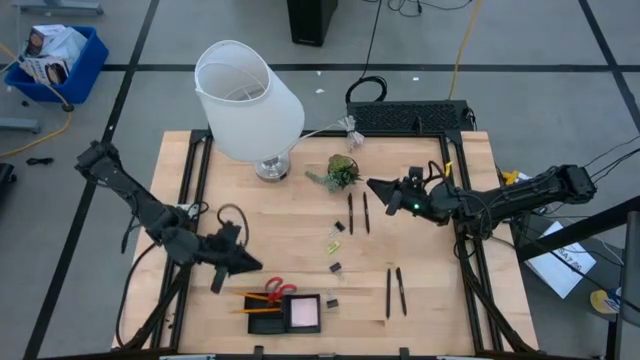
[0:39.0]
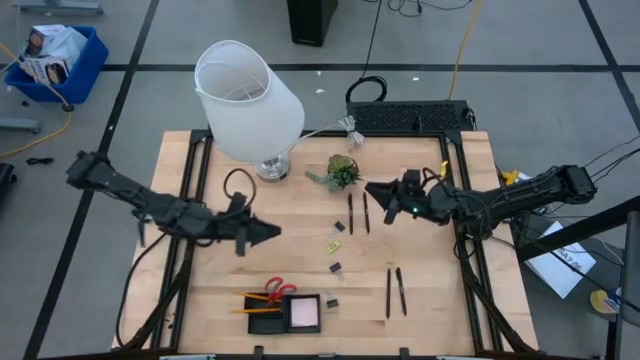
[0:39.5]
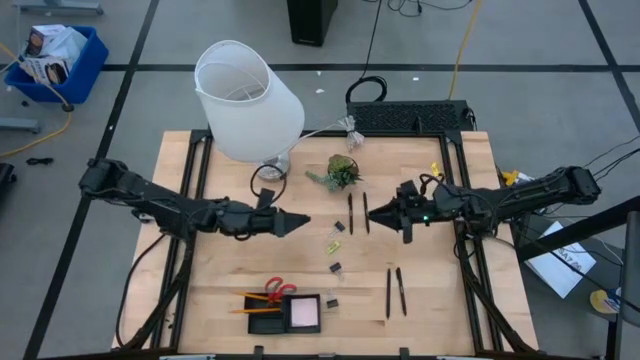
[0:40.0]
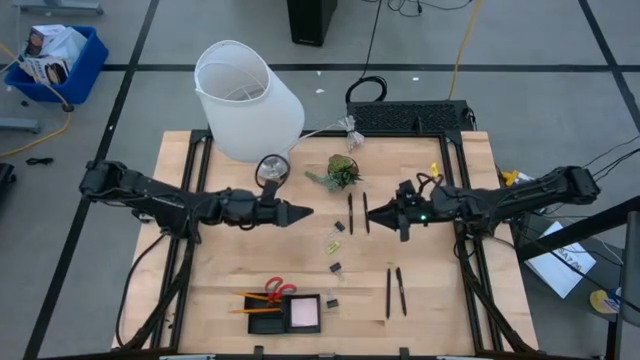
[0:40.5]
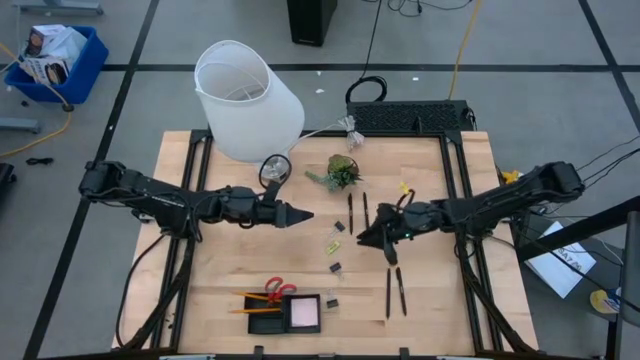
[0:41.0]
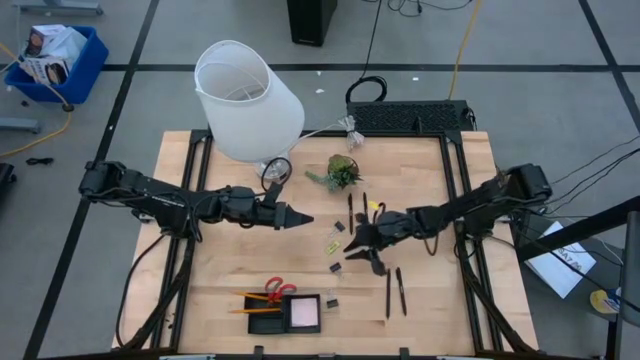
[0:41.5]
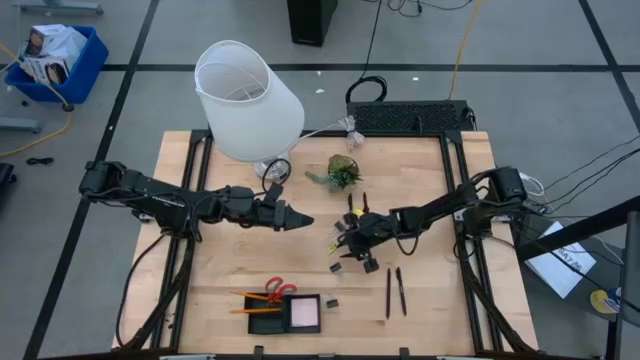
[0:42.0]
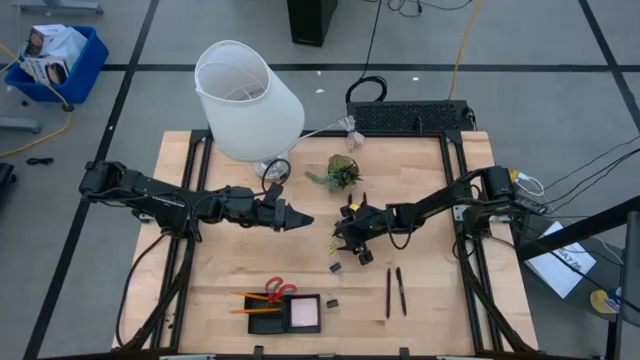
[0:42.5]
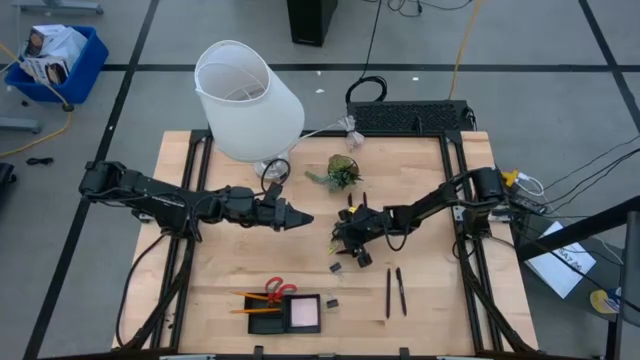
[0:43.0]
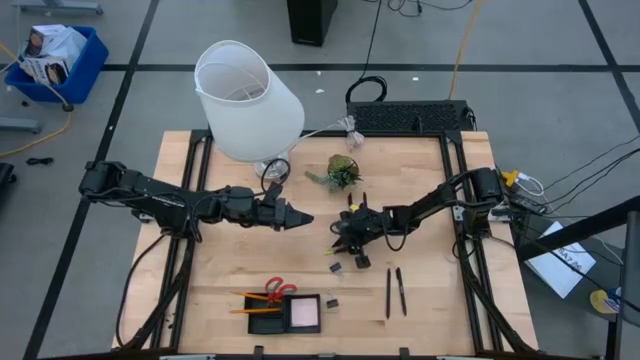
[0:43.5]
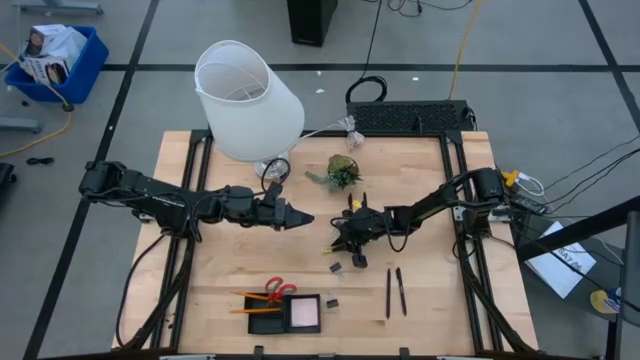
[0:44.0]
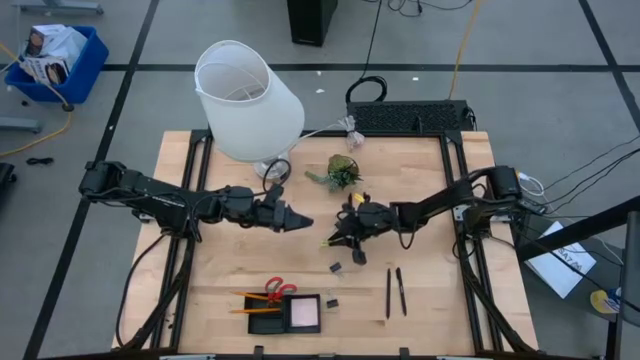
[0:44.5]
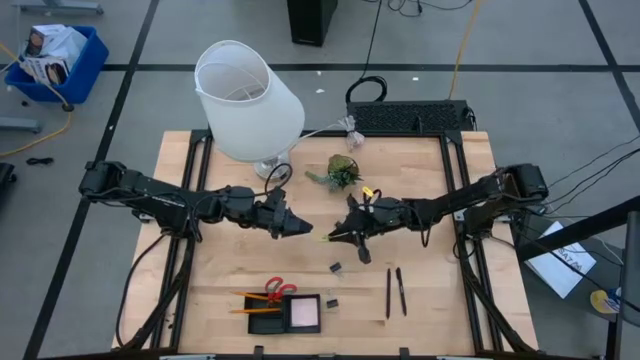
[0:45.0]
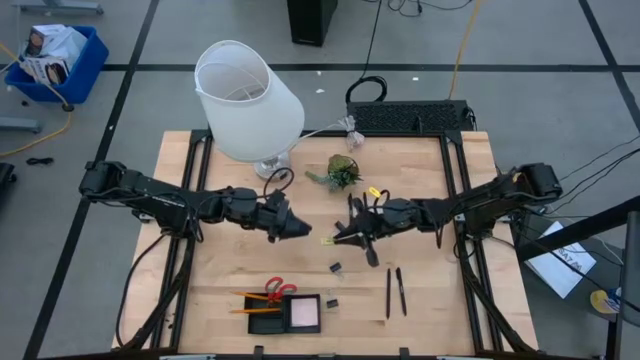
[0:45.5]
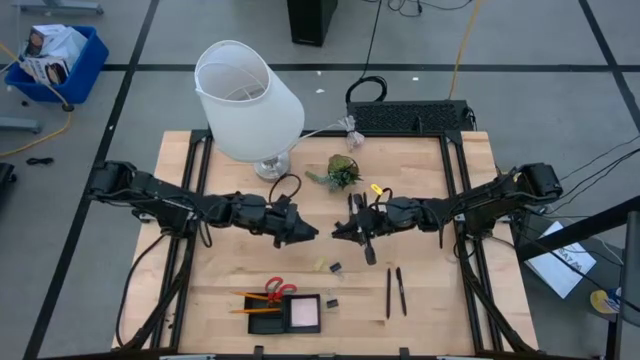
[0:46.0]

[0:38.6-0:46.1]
Task: Pick and place office supplies into organizer
Put the middle black binder clip into the mesh desk organizer

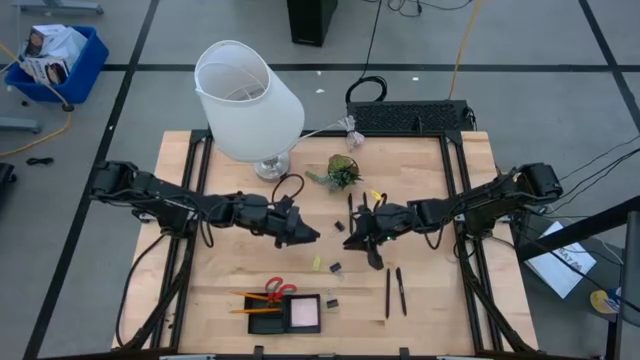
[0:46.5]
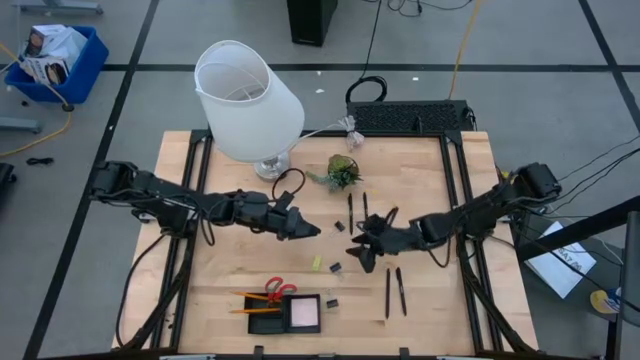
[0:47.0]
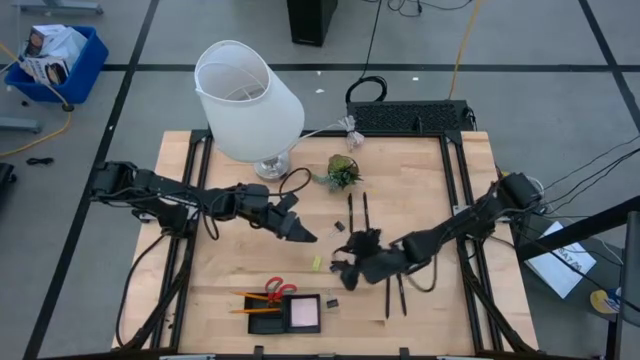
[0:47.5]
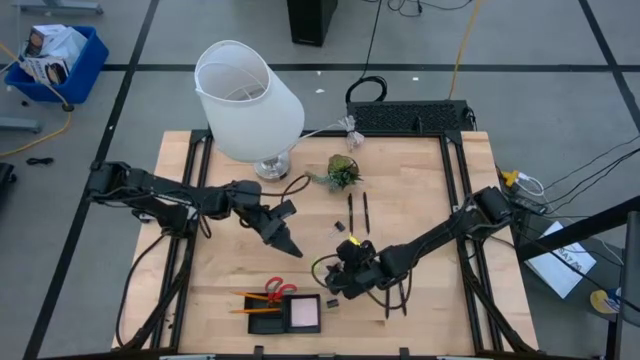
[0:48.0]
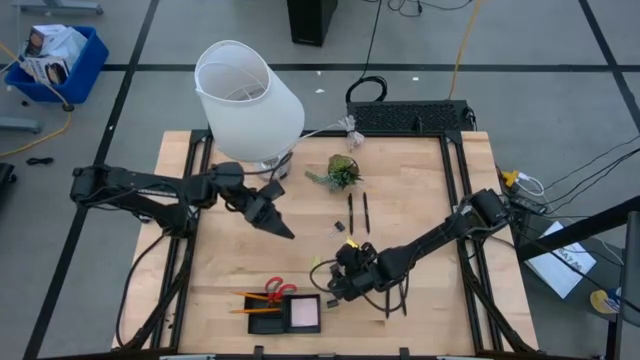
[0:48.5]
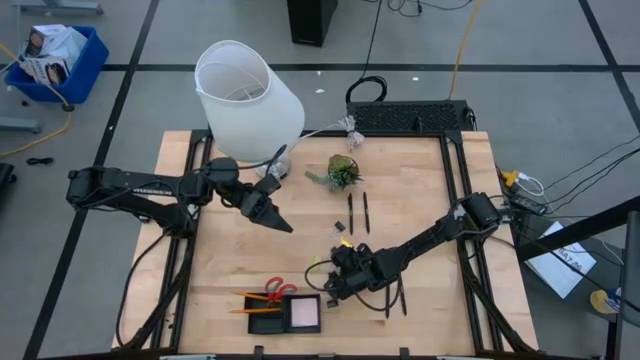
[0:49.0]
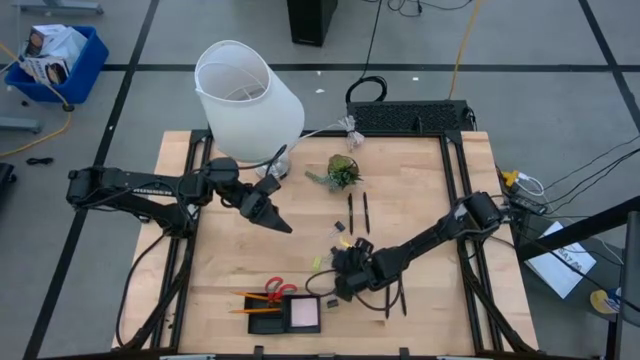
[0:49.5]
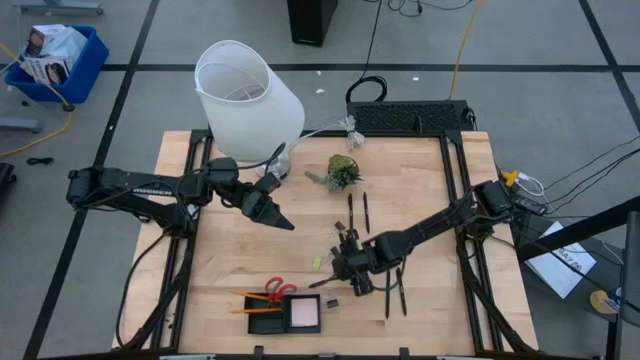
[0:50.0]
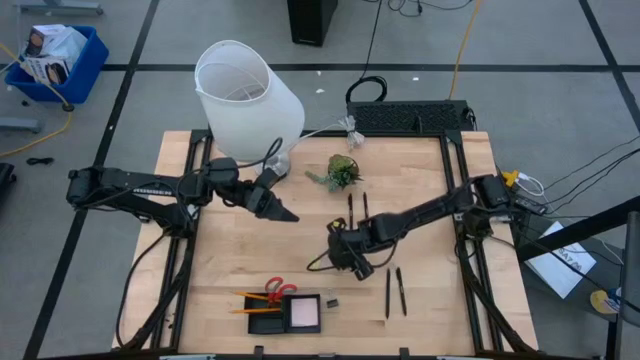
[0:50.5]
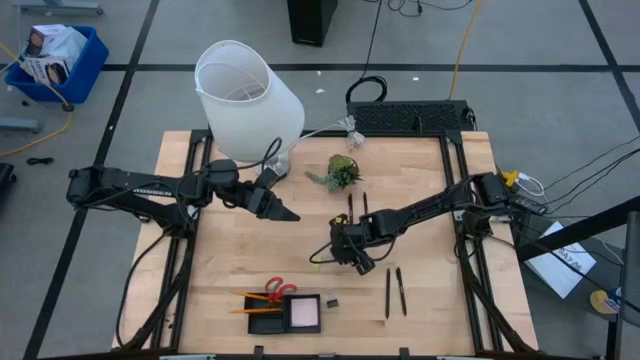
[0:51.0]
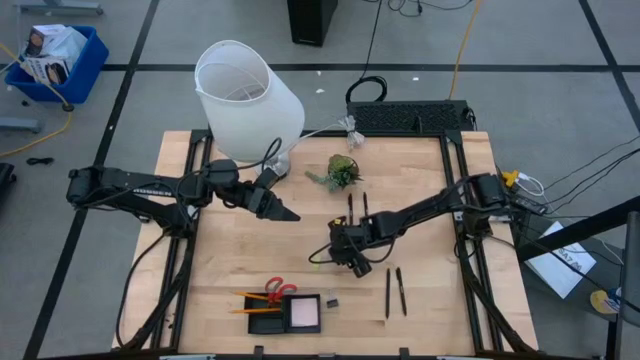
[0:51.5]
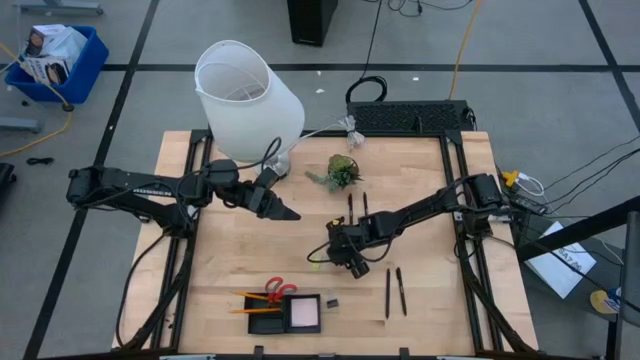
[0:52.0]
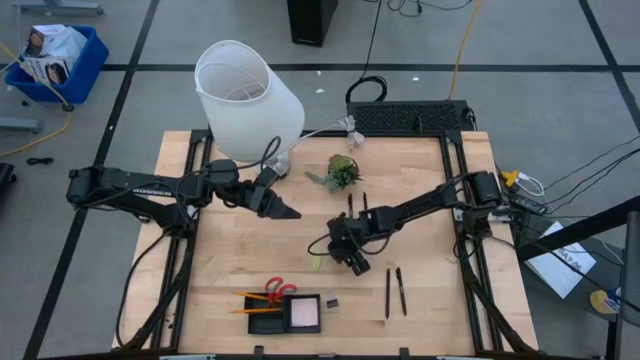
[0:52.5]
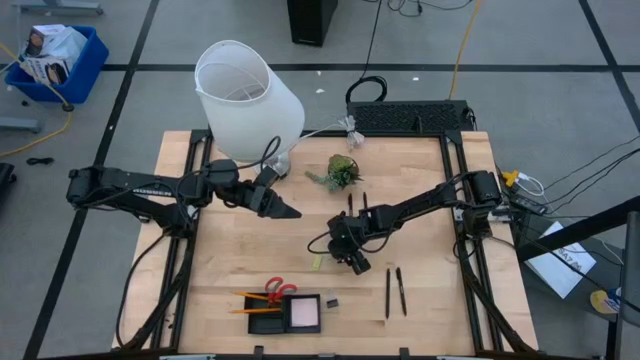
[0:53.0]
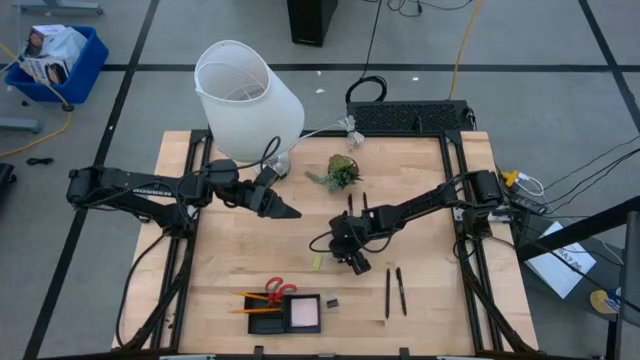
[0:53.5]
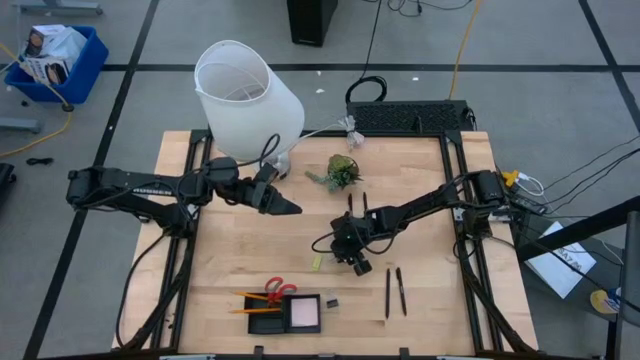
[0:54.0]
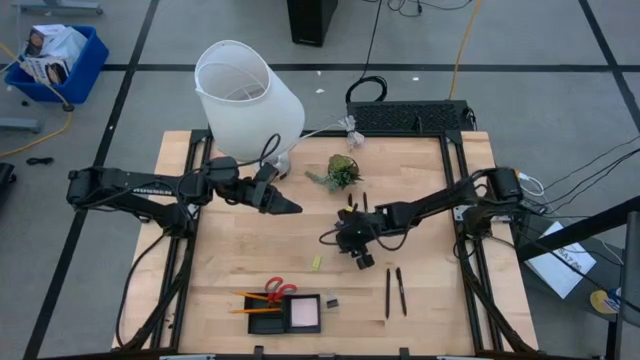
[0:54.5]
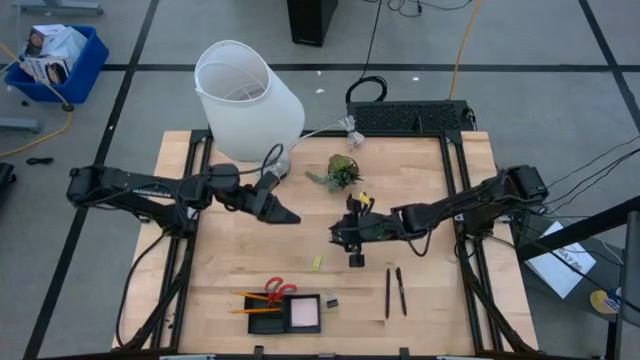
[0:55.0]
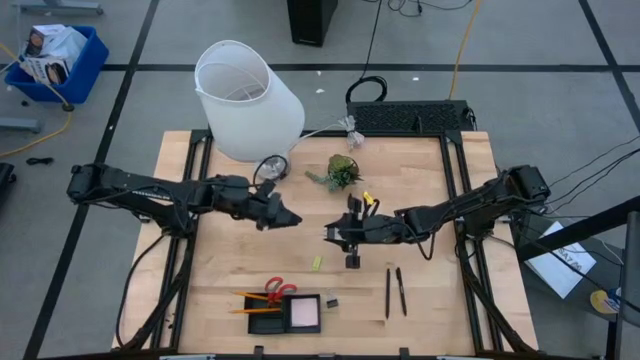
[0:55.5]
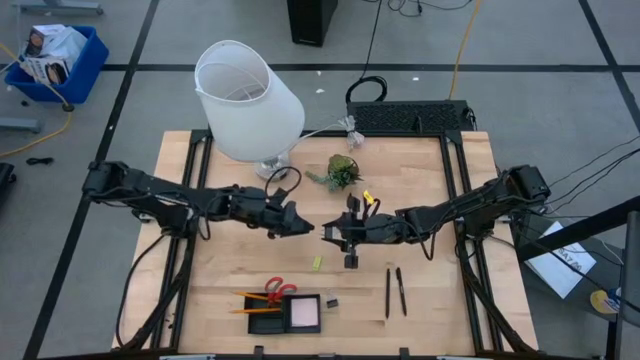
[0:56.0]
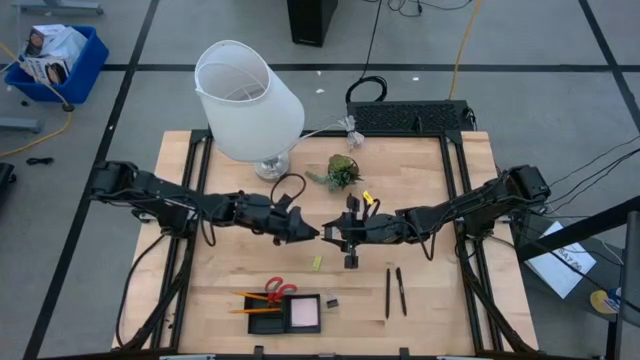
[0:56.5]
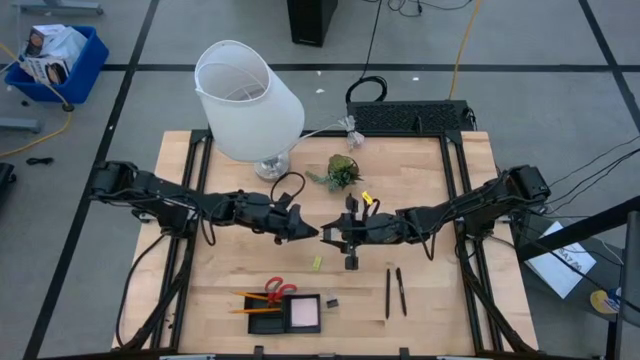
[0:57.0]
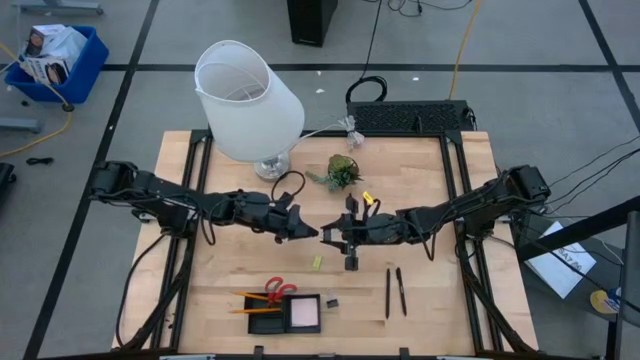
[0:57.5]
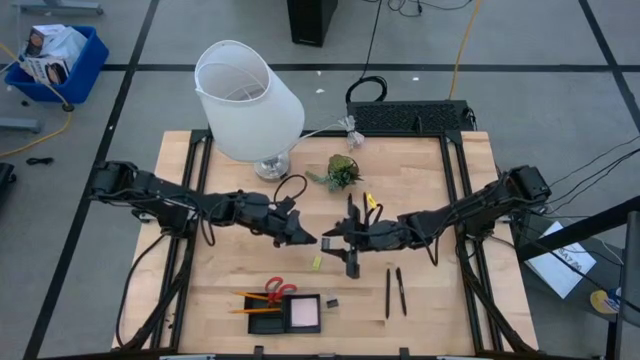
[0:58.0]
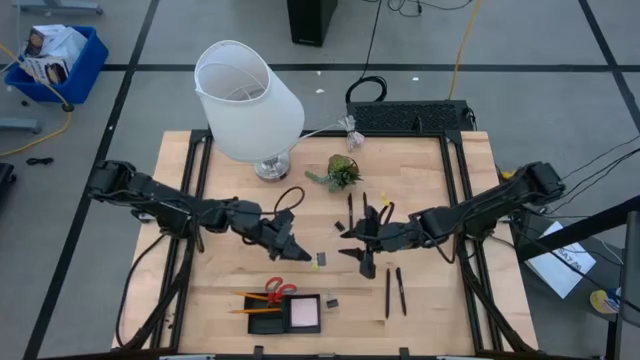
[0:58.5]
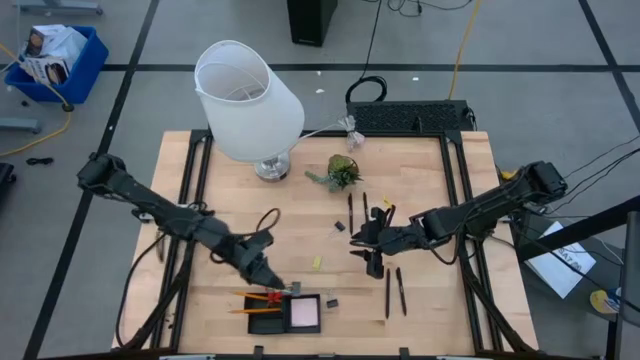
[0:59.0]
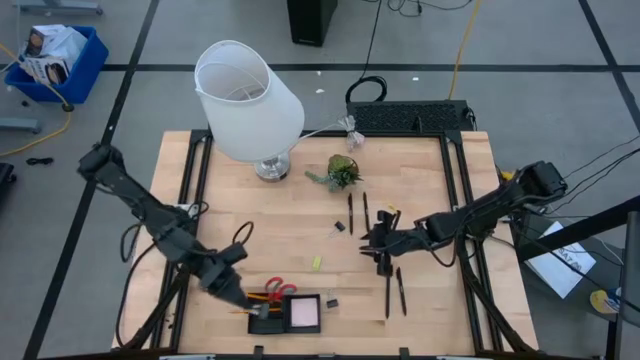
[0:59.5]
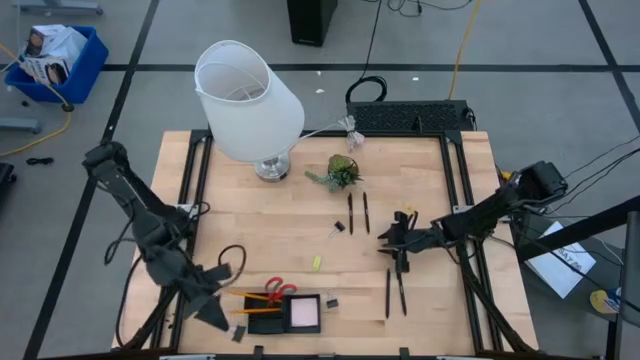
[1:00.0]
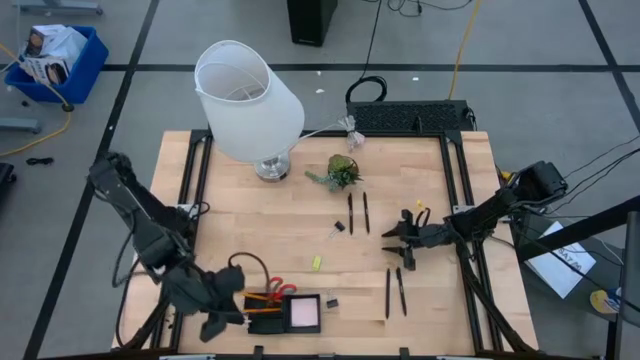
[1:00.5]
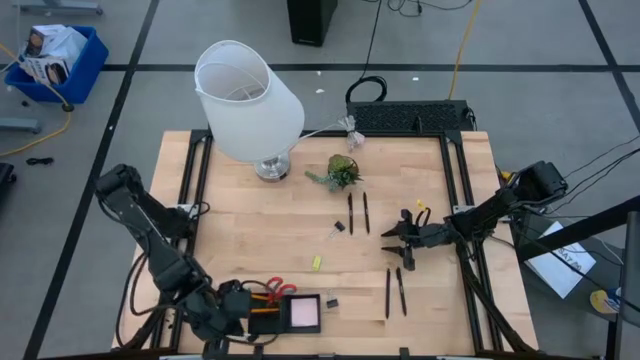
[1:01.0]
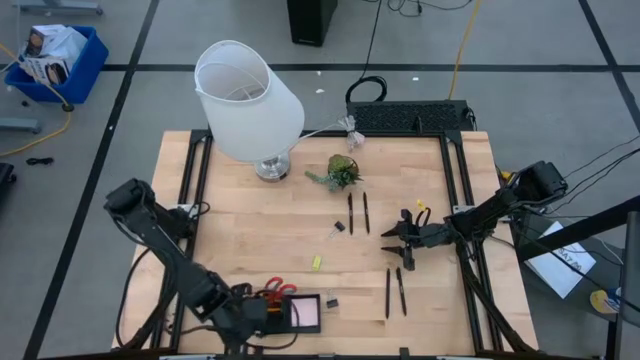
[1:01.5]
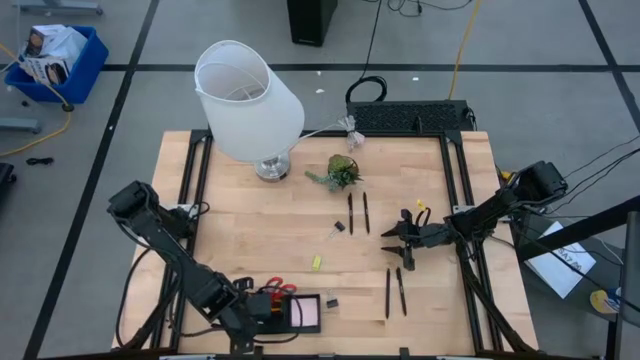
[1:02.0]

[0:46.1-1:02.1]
Put the middle black binder clip into the mesh desk organizer
